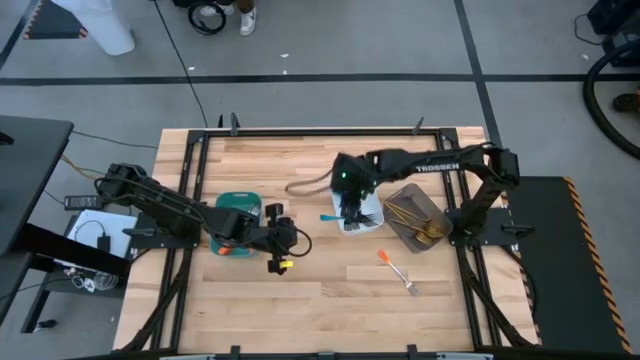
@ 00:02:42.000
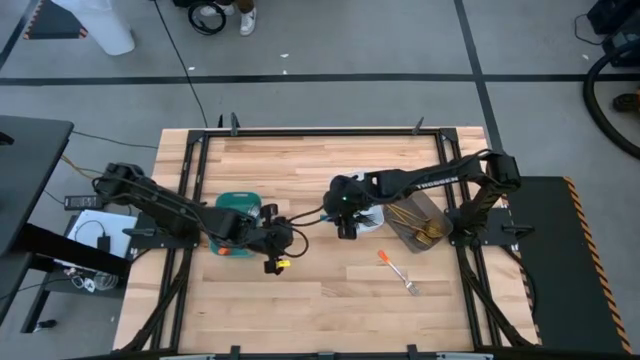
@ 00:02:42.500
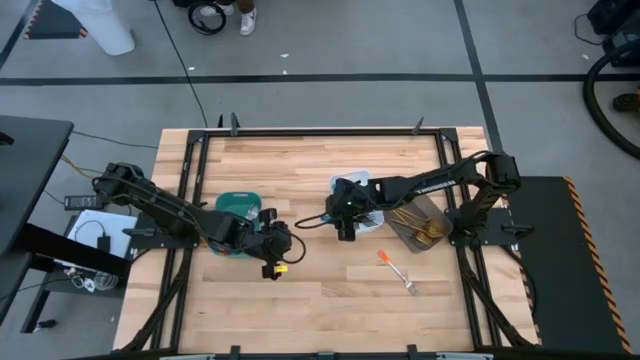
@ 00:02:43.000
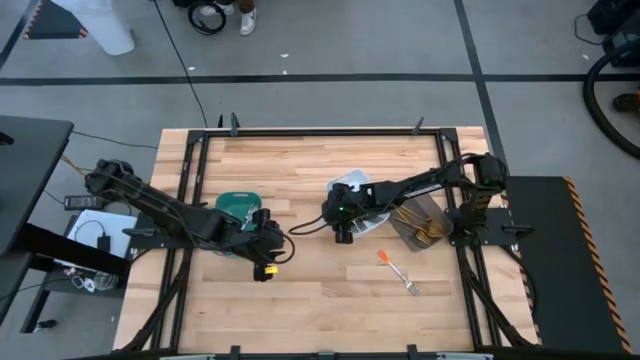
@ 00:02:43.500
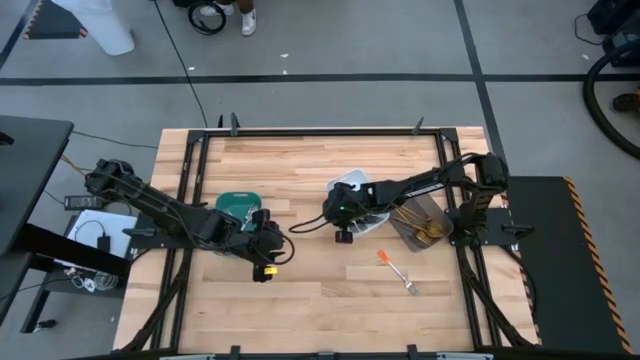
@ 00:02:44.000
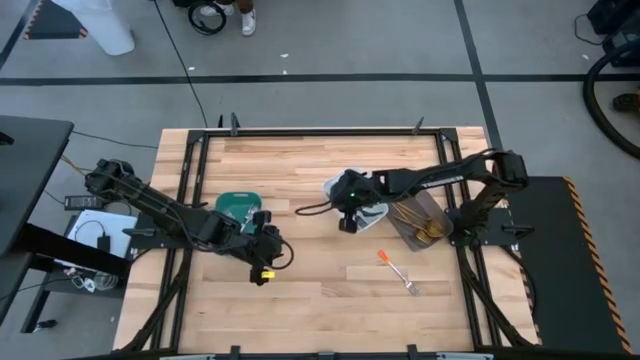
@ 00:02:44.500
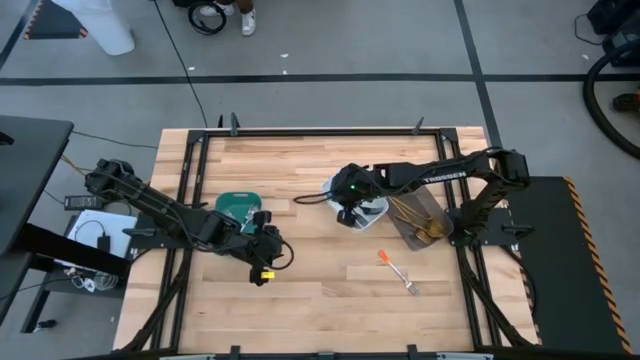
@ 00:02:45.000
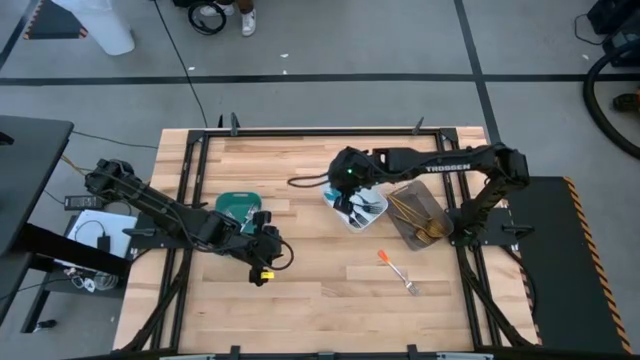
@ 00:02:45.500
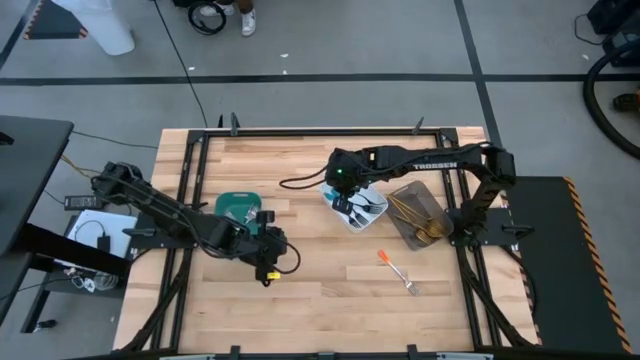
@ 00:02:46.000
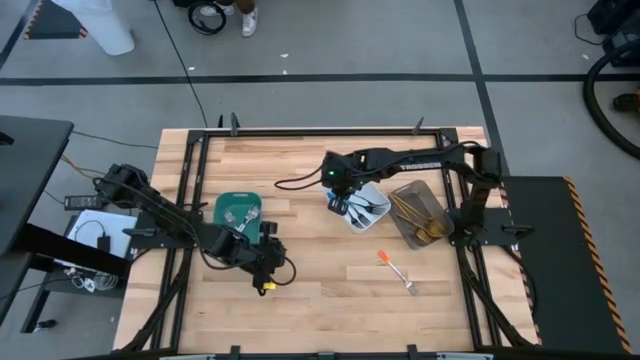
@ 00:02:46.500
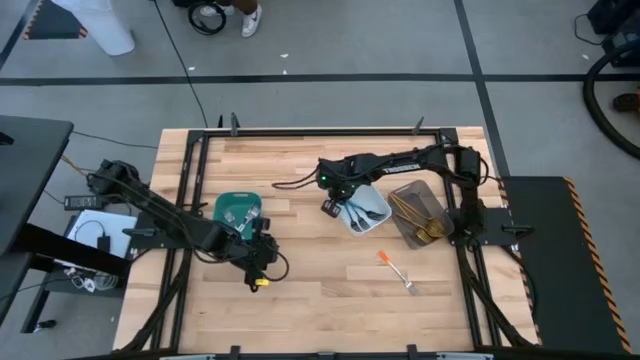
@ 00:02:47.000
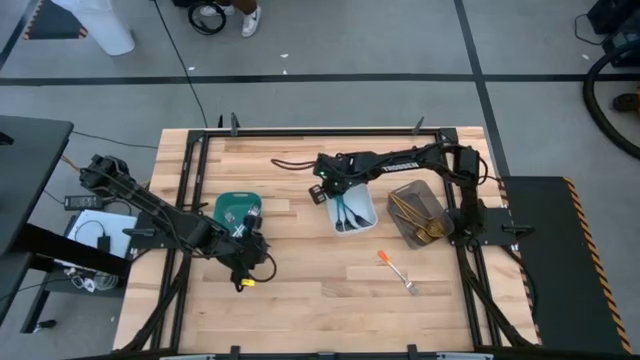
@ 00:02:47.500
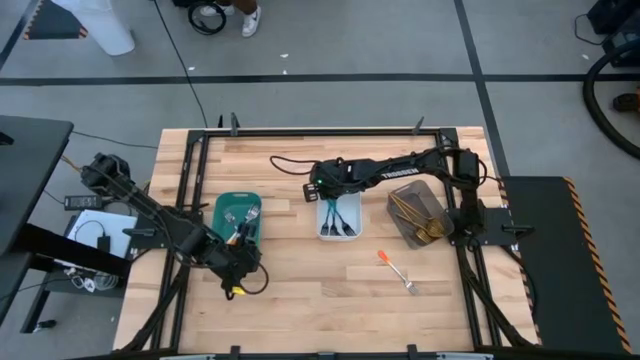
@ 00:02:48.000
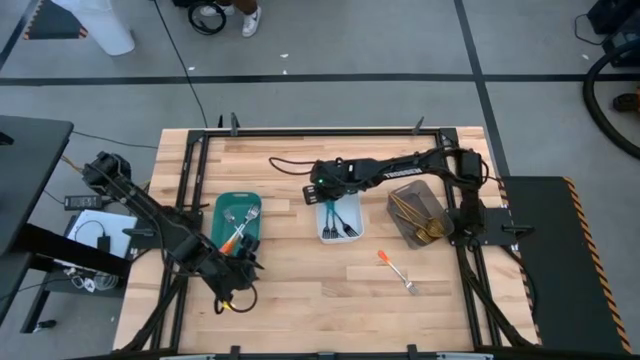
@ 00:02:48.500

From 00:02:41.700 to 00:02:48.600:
Task: Sort silverware by color (type)
Adjust the blue fork on the white bin

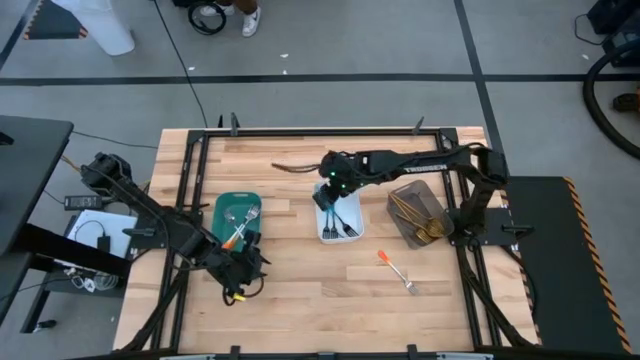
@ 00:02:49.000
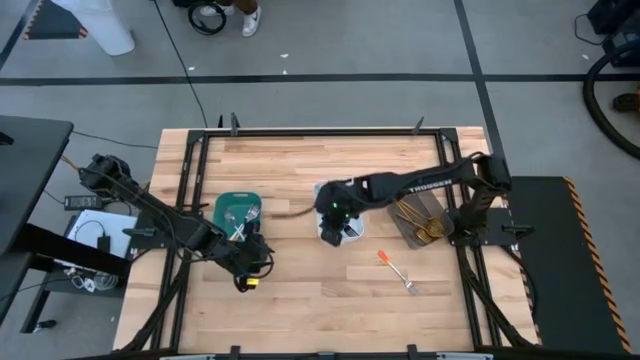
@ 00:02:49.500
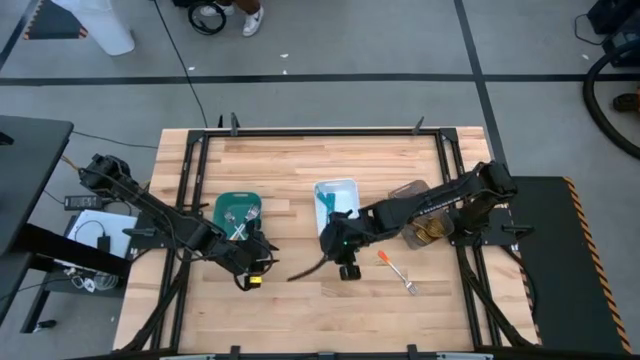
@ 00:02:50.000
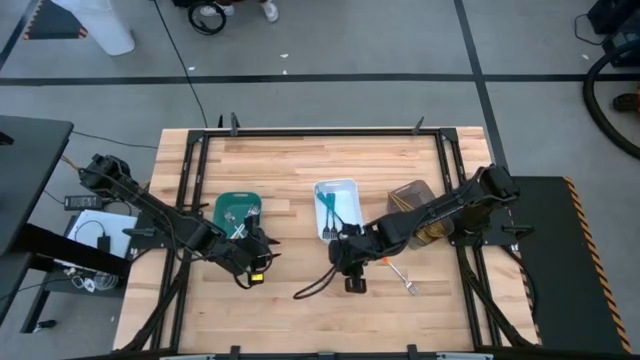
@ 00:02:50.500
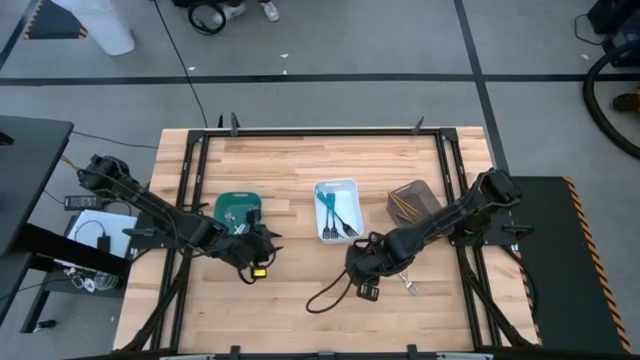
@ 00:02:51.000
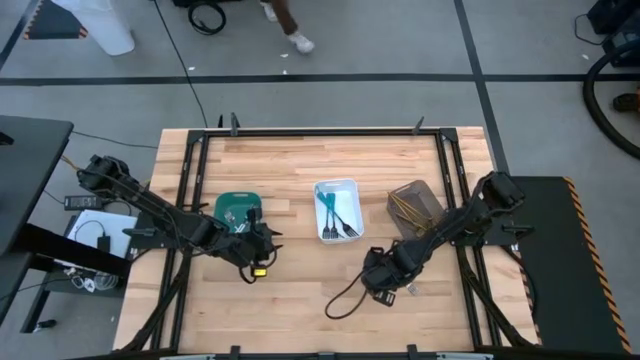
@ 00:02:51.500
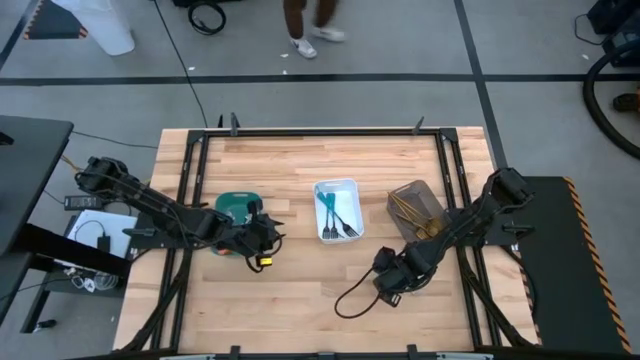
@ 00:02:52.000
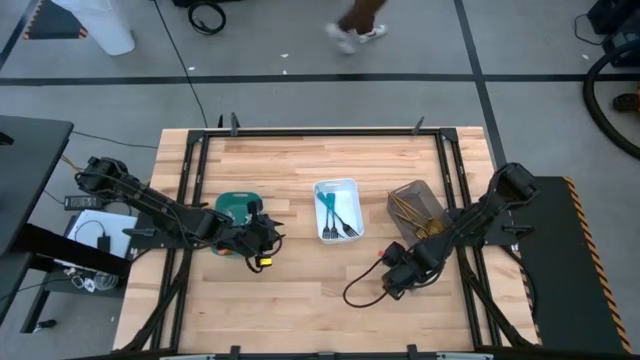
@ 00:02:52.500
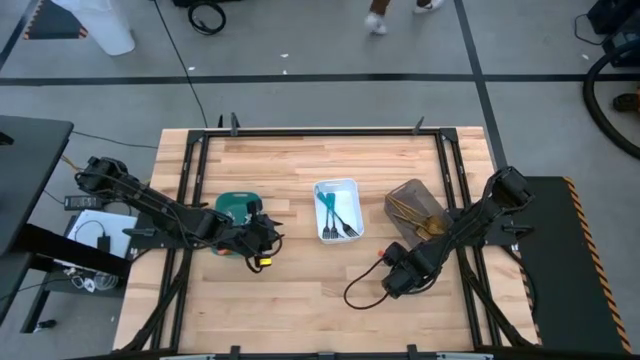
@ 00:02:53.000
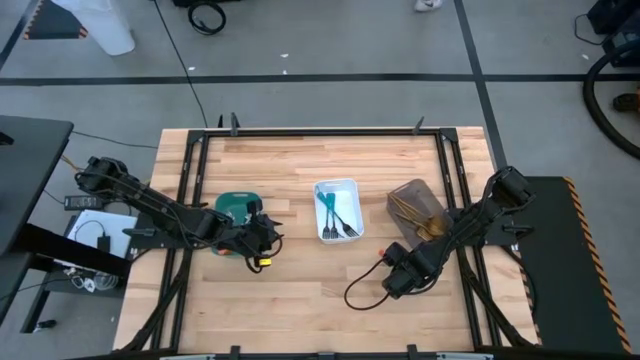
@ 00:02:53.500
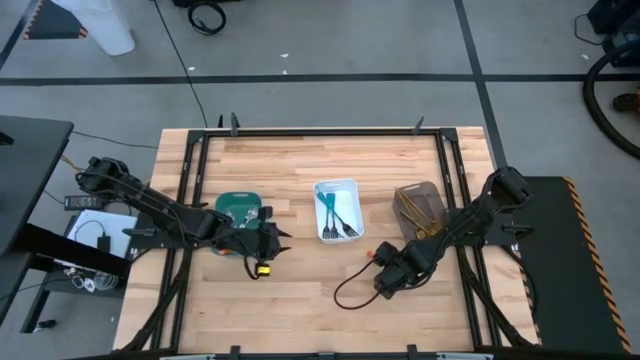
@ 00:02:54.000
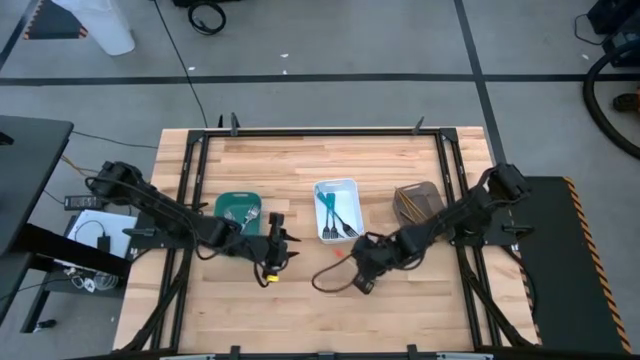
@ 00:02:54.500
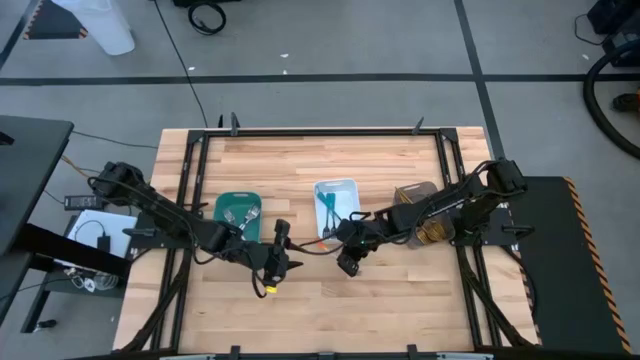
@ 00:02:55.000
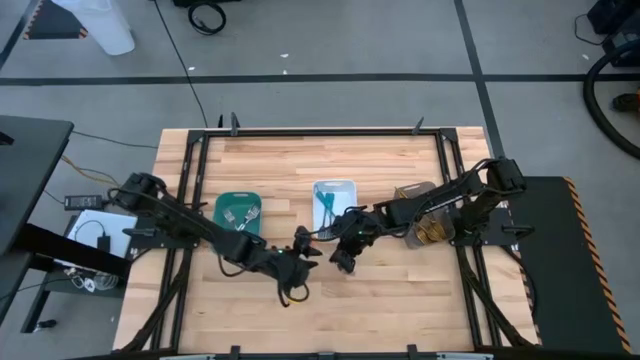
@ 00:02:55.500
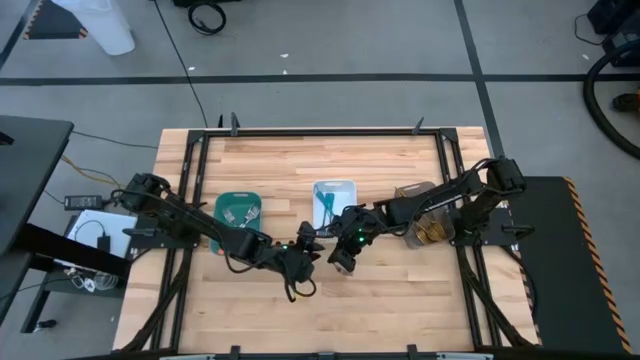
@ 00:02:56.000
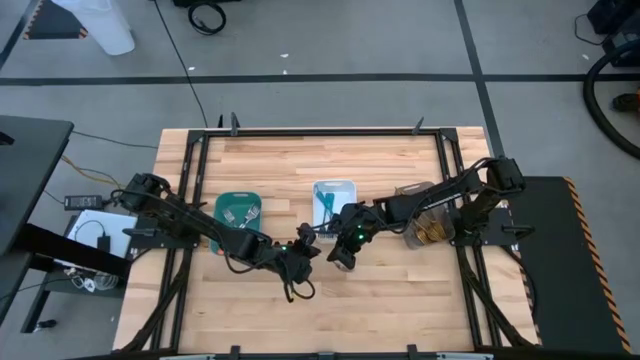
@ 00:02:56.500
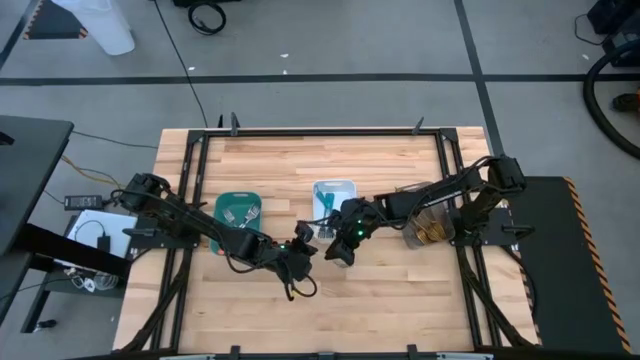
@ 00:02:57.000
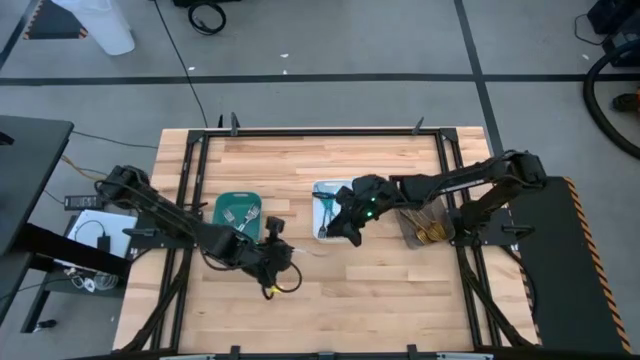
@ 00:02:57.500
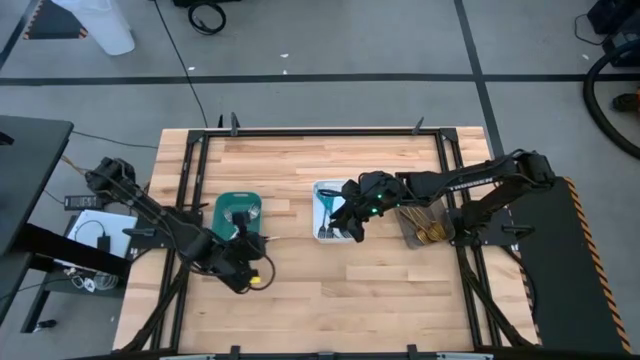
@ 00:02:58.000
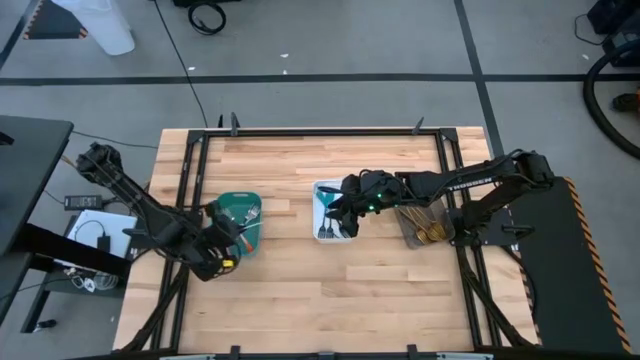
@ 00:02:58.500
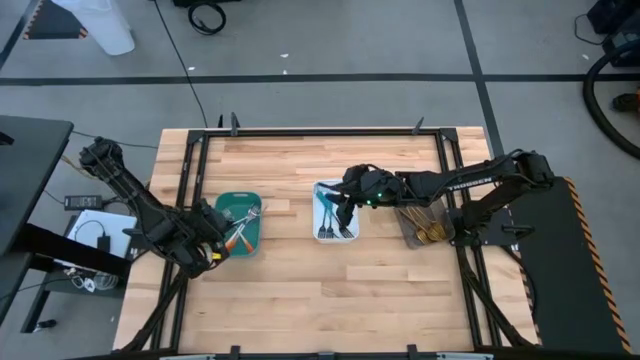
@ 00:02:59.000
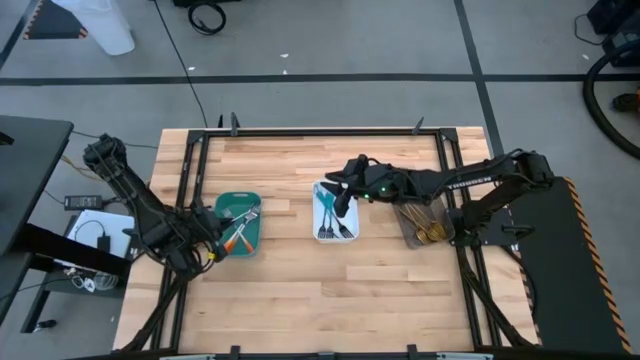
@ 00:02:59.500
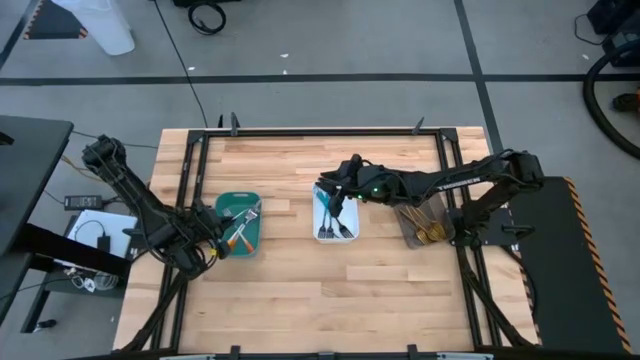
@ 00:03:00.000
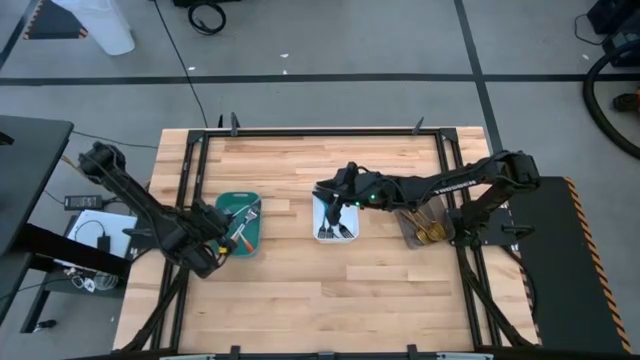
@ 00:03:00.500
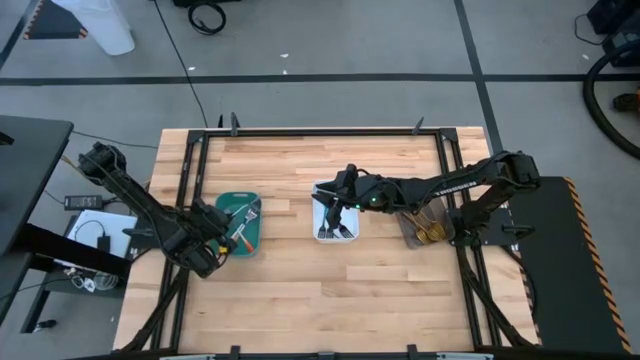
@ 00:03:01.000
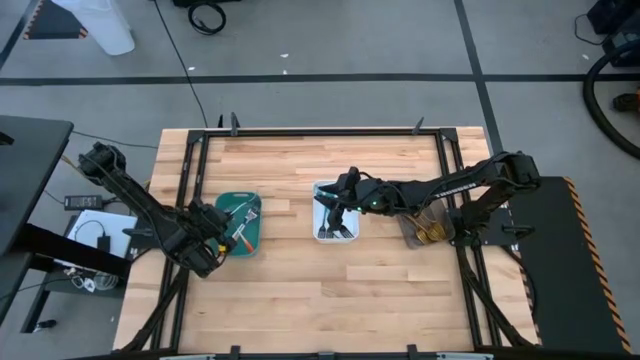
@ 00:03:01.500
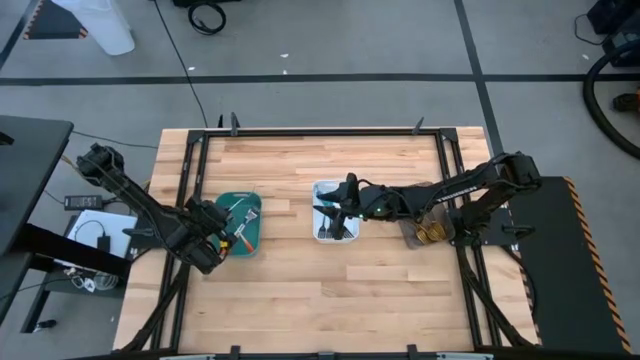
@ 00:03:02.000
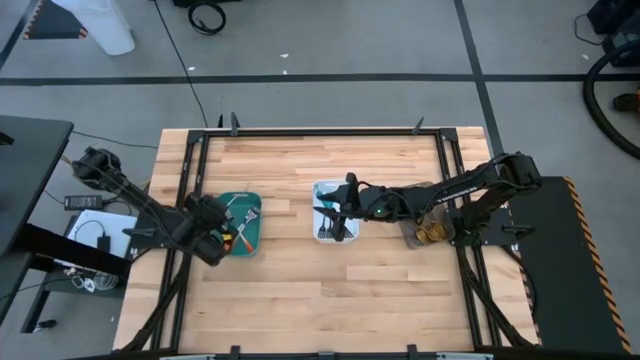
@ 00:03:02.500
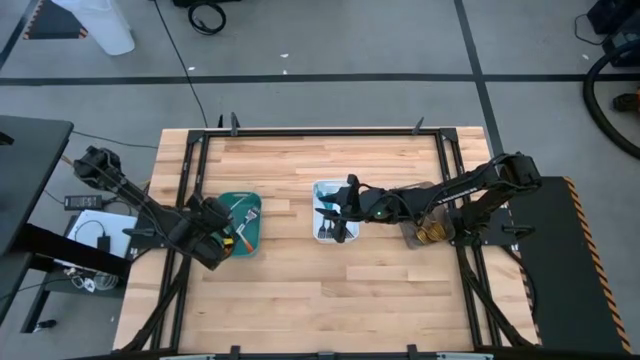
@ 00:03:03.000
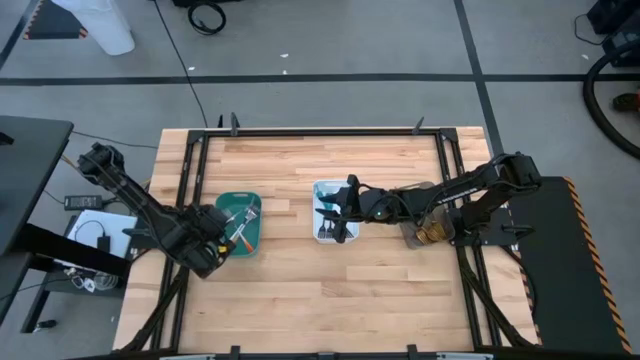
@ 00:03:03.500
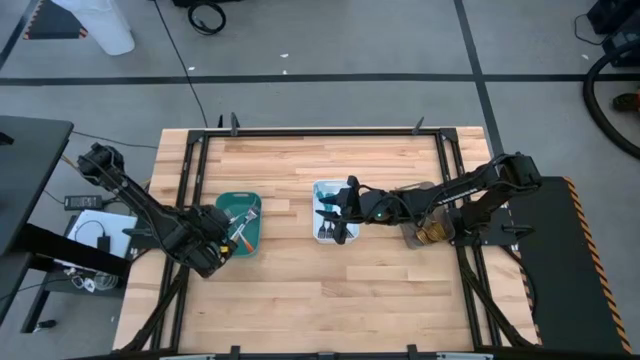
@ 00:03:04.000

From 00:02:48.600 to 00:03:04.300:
Put the orange fork into the green bin
